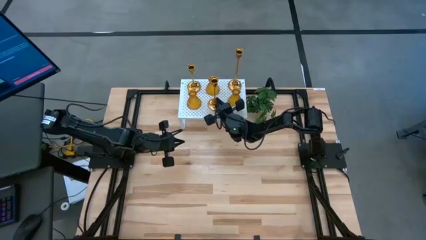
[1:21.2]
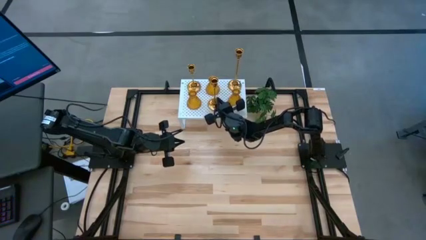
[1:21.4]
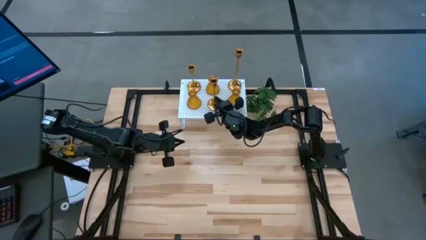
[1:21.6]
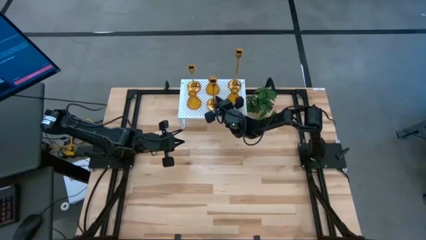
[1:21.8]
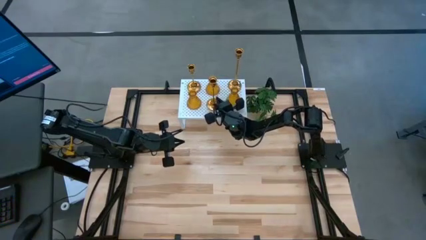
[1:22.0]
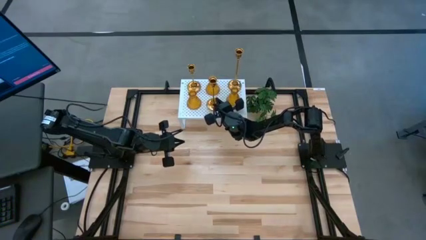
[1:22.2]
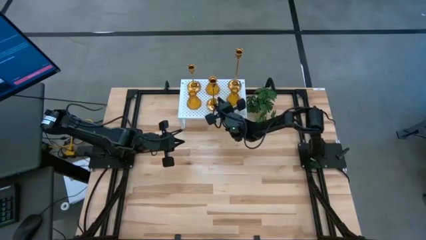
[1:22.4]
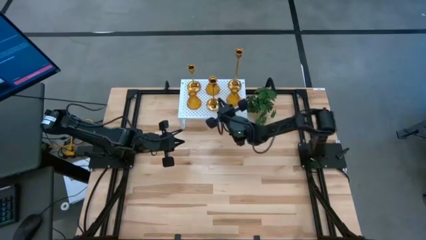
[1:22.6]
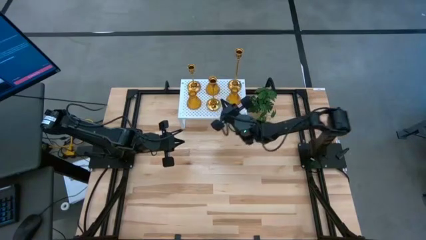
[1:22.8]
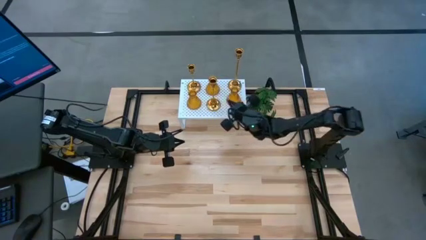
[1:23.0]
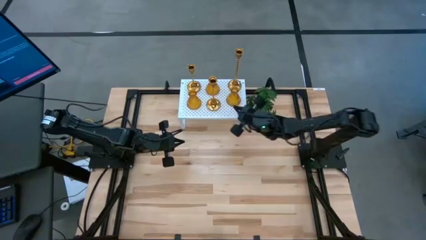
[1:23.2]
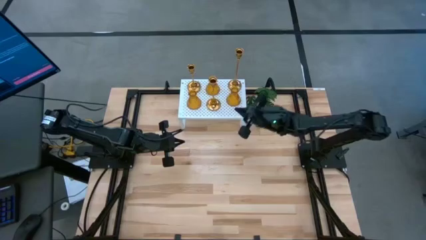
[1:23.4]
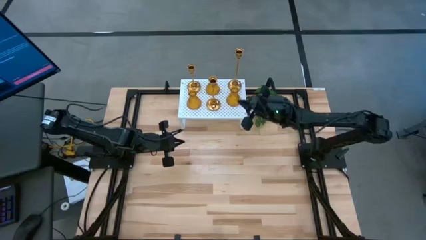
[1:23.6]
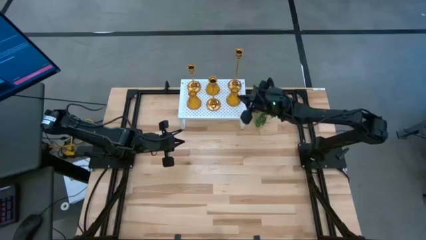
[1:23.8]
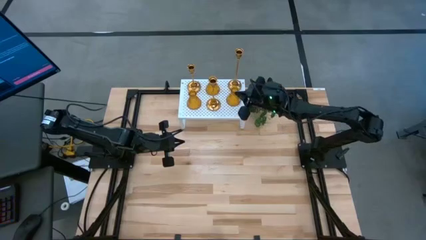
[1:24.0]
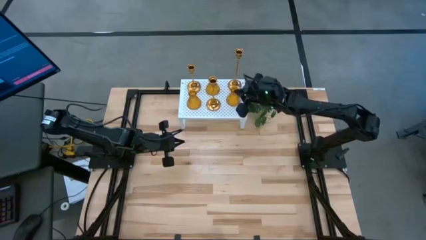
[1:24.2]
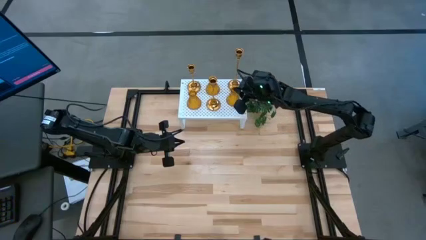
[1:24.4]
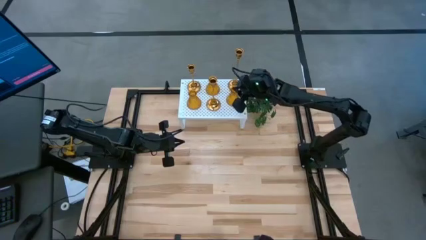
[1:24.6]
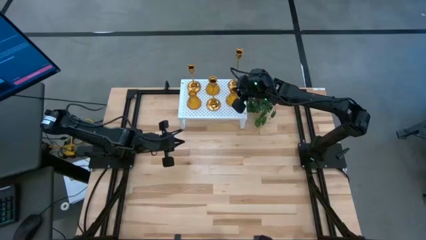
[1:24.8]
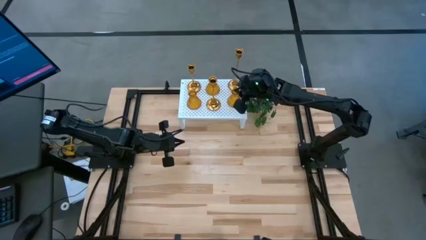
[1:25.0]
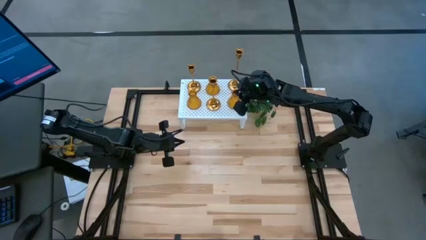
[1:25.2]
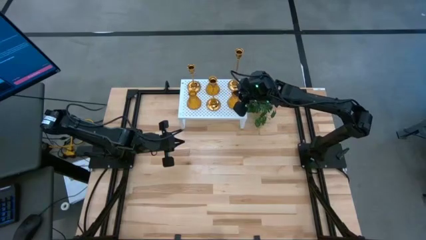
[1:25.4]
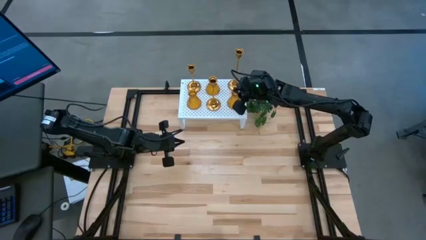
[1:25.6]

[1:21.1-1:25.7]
Task: Pick & Place candle stick holders
Adjust the gold vase on the shelf

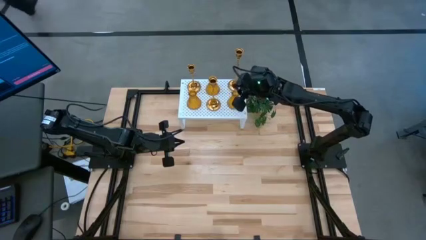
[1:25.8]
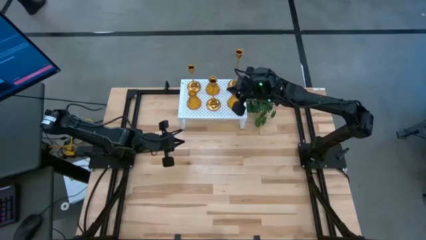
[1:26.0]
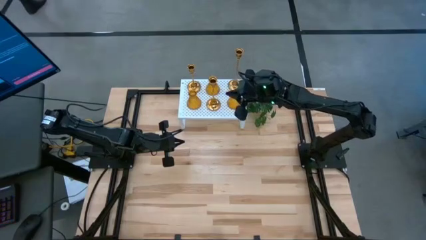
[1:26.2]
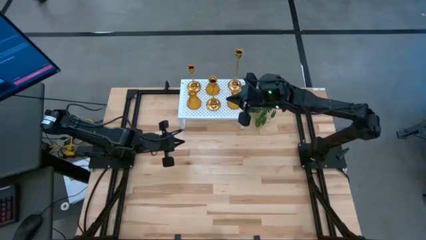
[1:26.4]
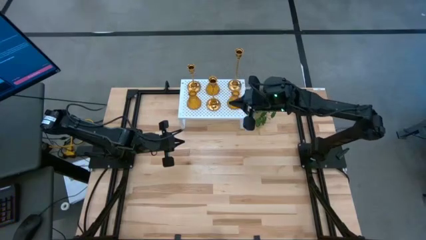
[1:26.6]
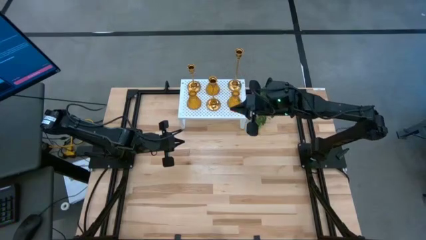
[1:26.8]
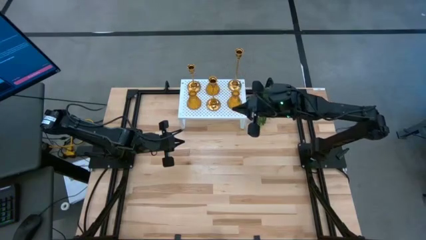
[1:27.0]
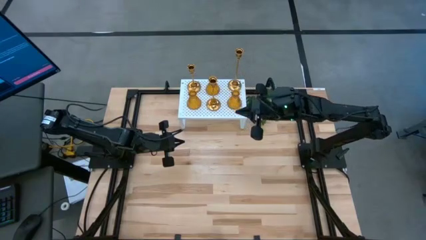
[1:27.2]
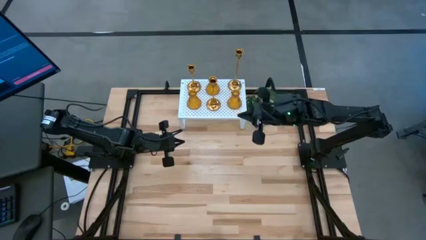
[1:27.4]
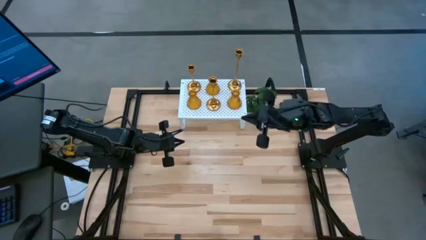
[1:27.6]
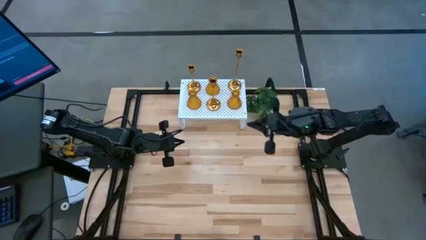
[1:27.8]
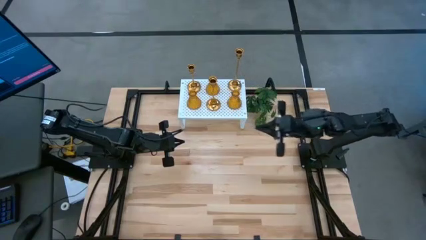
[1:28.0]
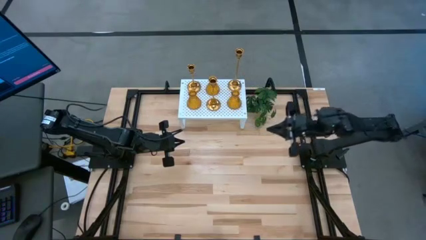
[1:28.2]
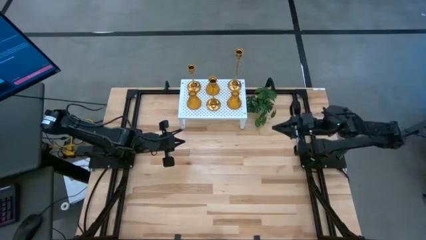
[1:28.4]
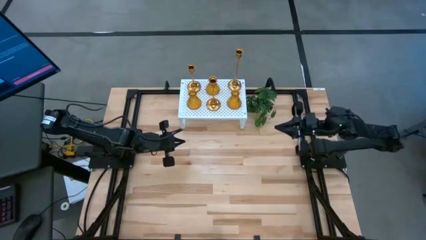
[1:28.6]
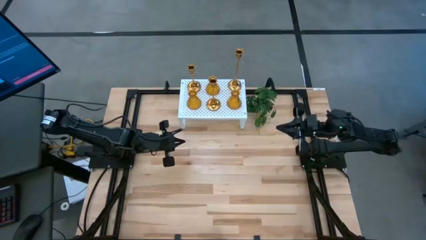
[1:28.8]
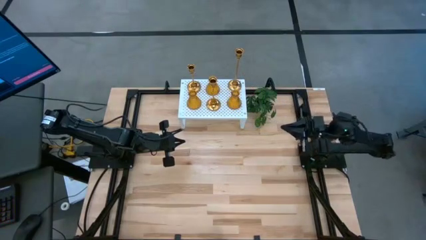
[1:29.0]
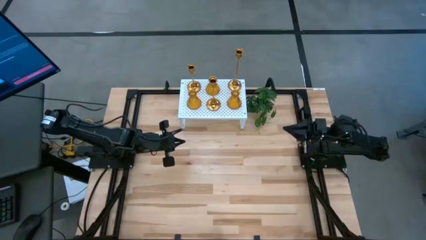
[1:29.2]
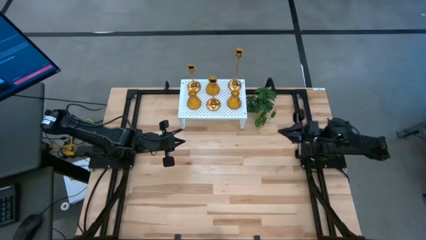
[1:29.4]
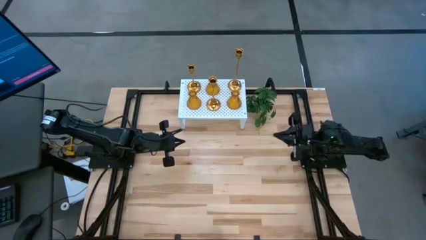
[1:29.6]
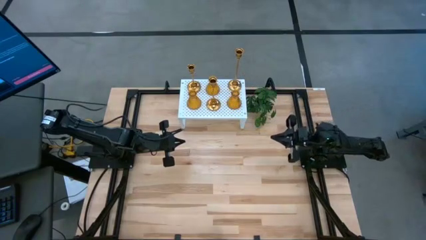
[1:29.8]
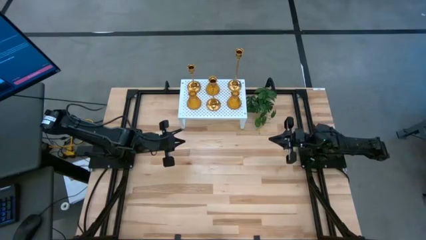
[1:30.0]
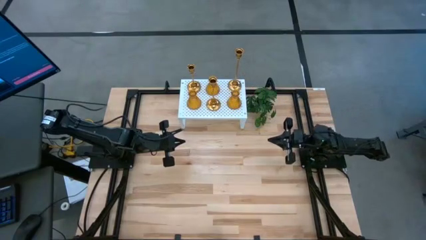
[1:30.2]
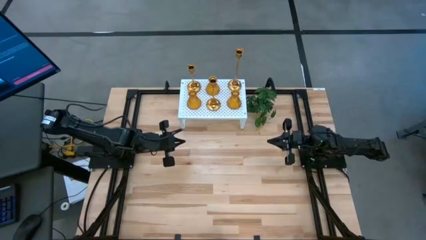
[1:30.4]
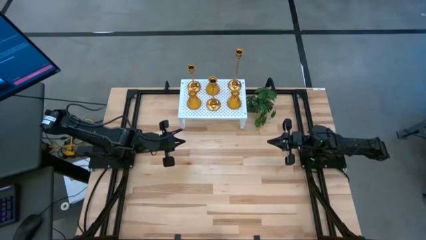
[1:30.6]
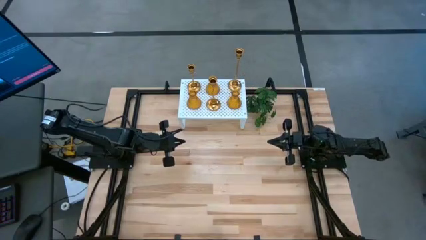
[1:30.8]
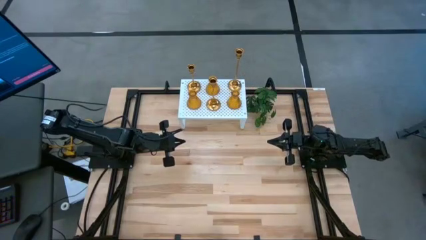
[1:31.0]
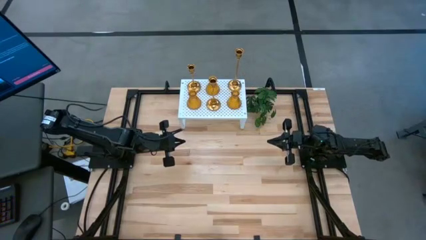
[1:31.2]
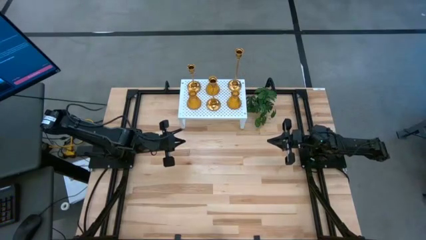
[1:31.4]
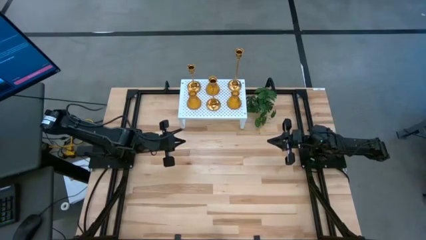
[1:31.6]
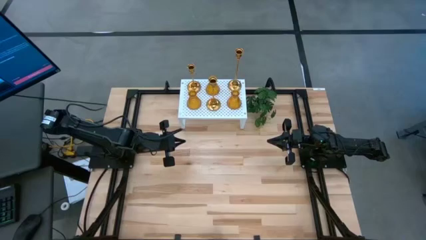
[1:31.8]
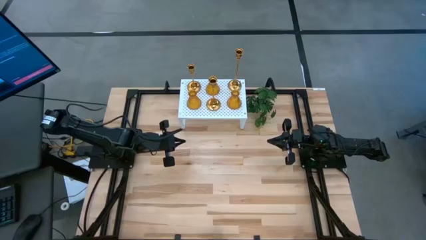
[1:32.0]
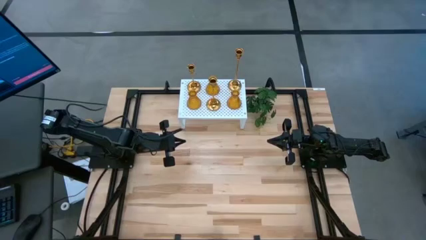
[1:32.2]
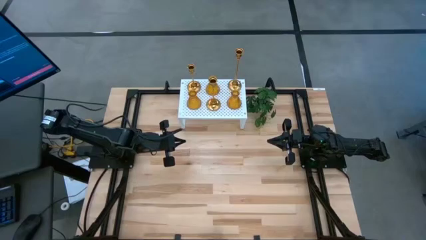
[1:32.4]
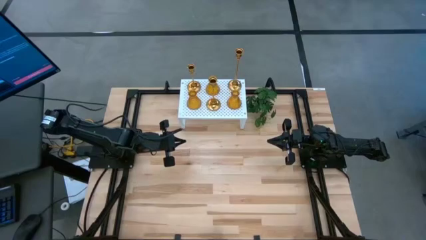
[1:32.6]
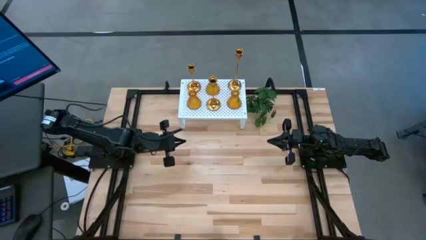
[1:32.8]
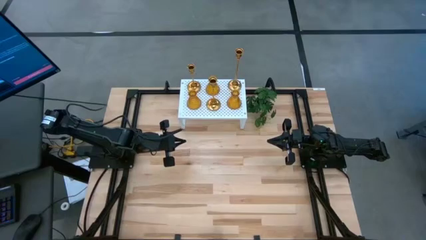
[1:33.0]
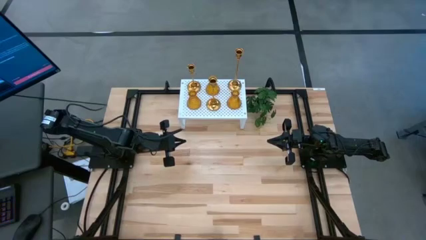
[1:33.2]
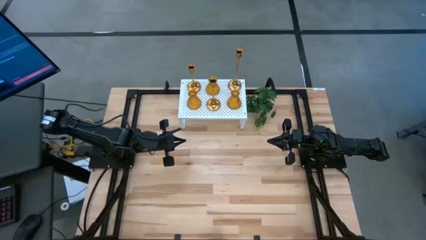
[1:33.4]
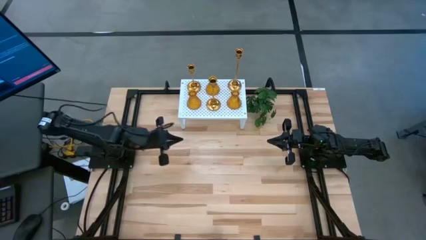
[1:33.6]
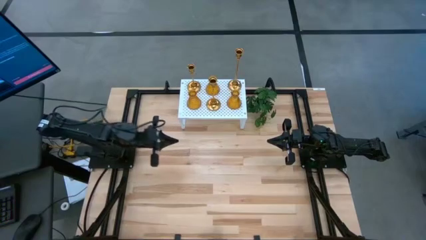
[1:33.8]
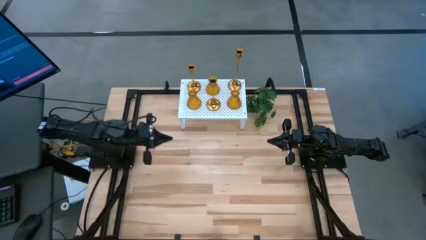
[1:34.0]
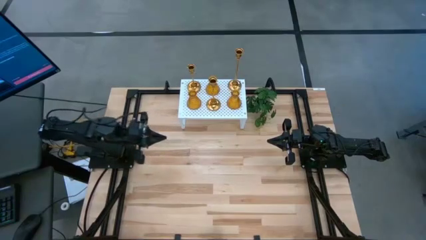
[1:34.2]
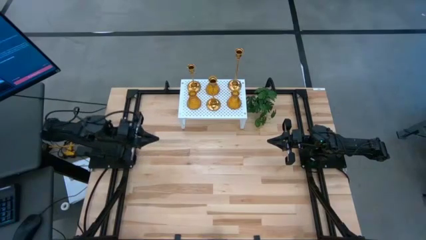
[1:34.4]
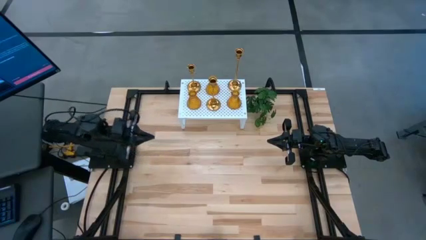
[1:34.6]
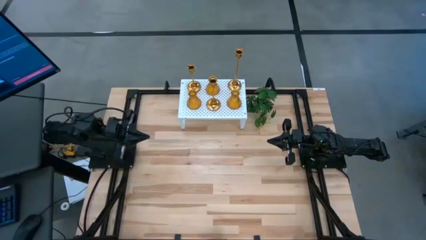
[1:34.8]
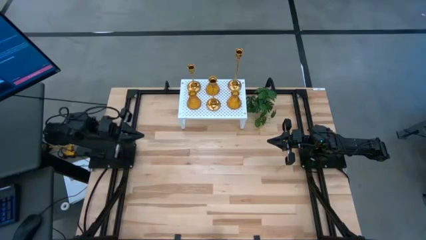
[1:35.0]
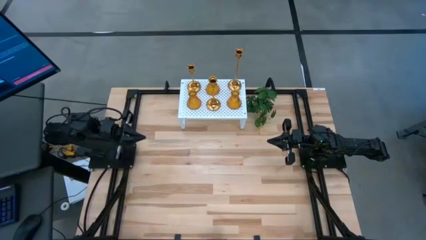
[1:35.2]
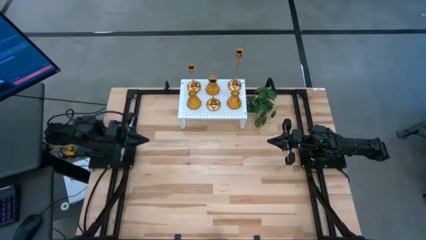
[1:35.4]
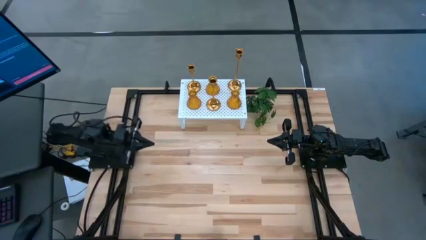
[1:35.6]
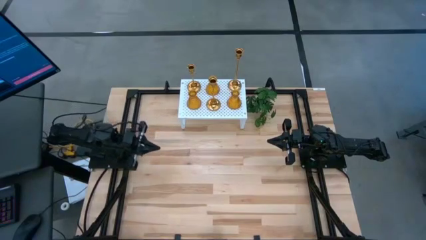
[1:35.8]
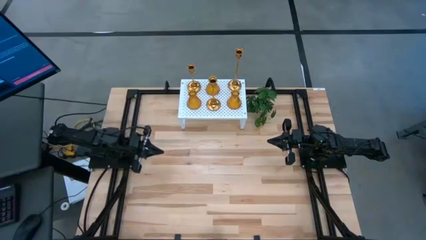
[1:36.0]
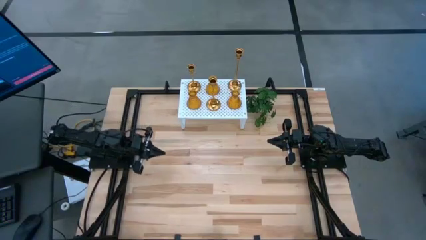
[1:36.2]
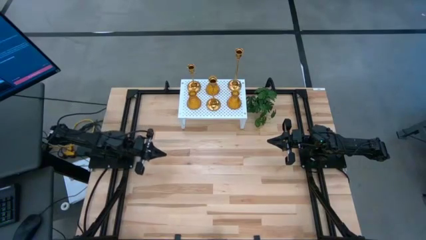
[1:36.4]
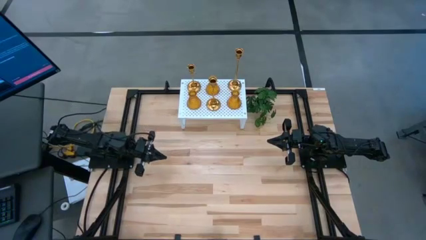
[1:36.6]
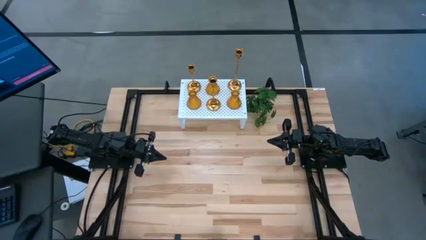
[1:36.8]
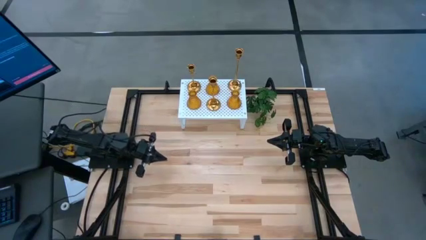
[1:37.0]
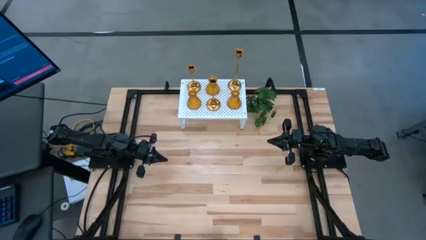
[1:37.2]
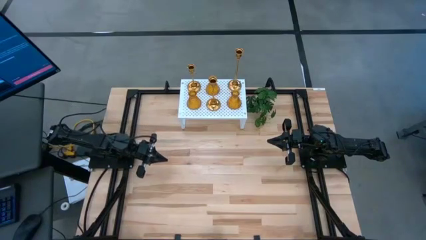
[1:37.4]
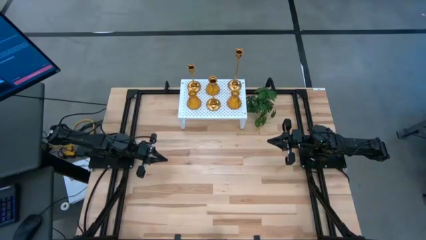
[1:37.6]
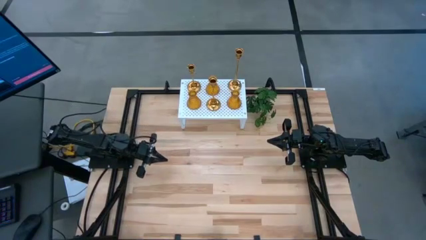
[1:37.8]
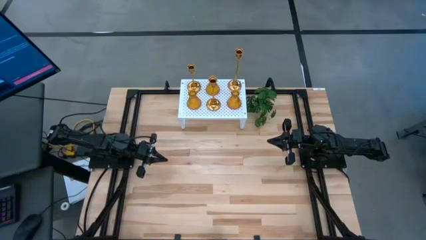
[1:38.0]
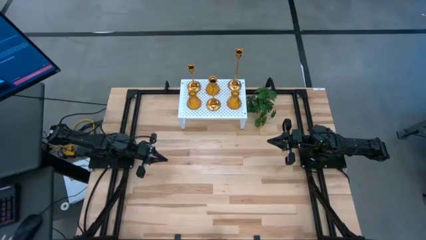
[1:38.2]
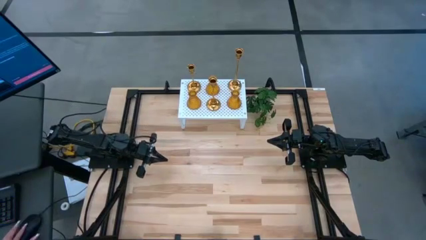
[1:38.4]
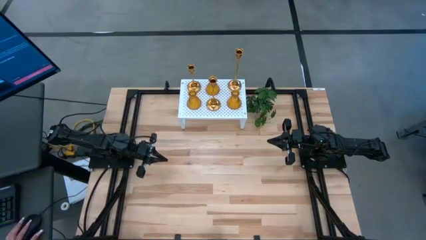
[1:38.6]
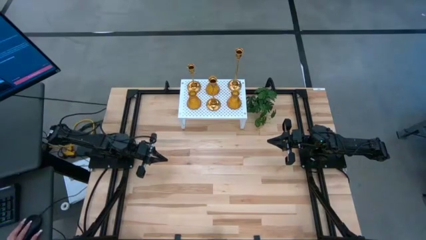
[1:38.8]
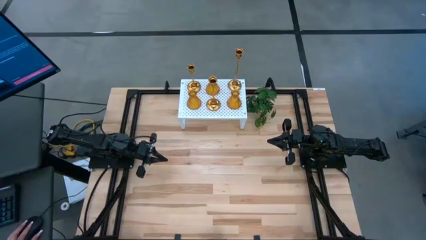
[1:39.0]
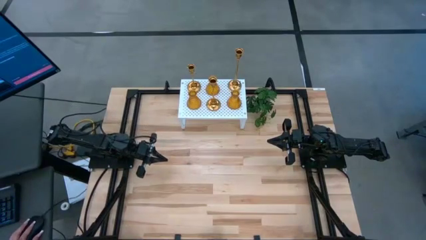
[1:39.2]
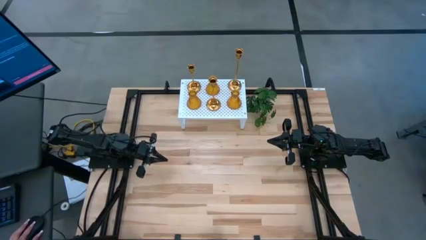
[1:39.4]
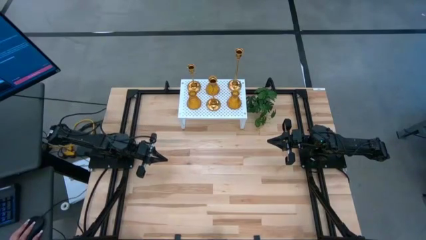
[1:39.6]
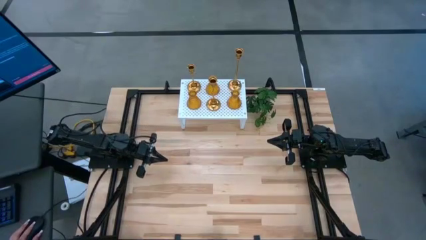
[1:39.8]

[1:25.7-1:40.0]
Return to Home Position
